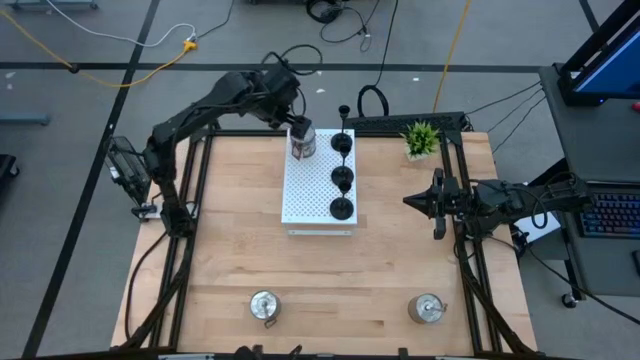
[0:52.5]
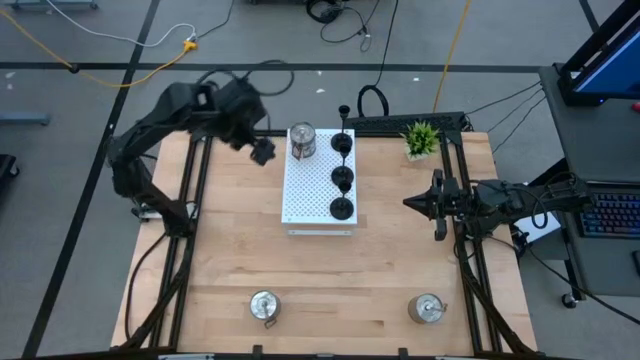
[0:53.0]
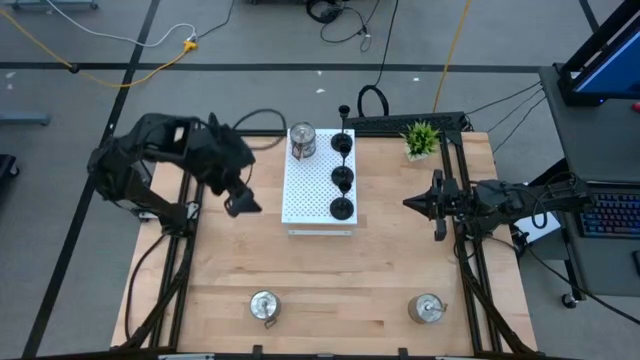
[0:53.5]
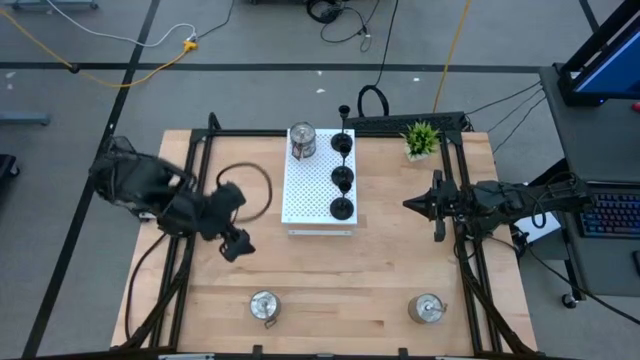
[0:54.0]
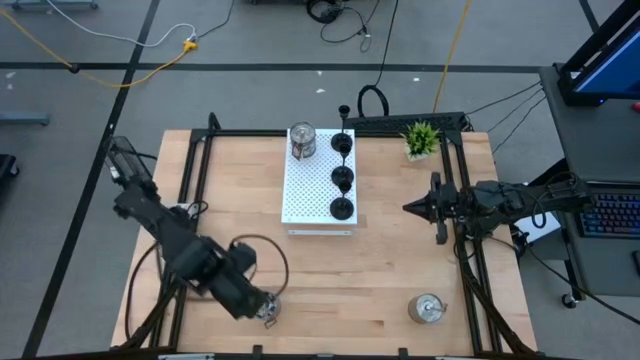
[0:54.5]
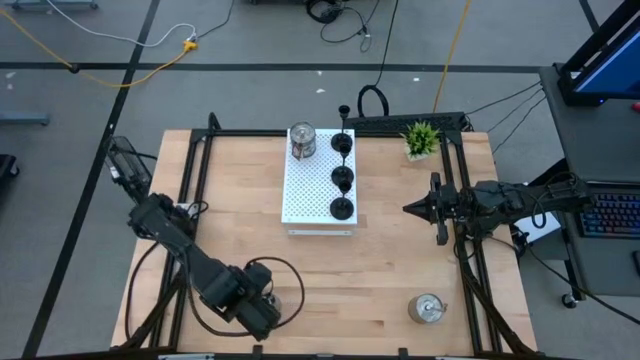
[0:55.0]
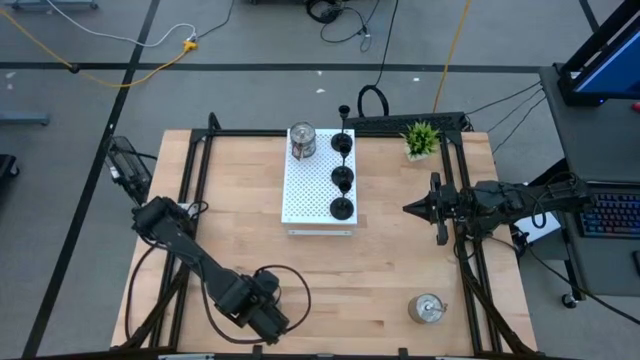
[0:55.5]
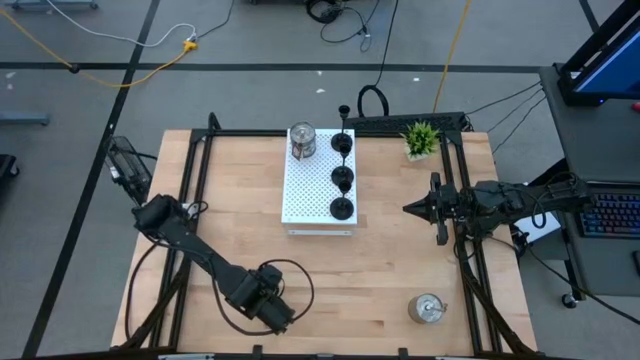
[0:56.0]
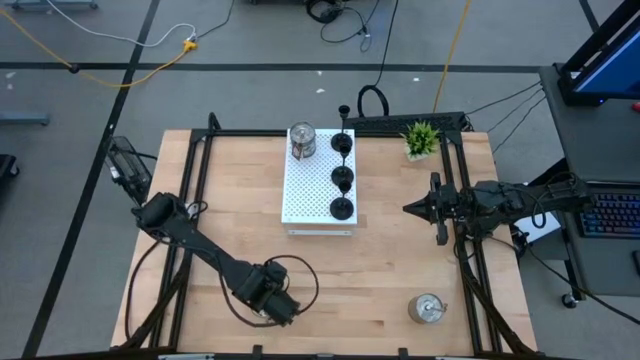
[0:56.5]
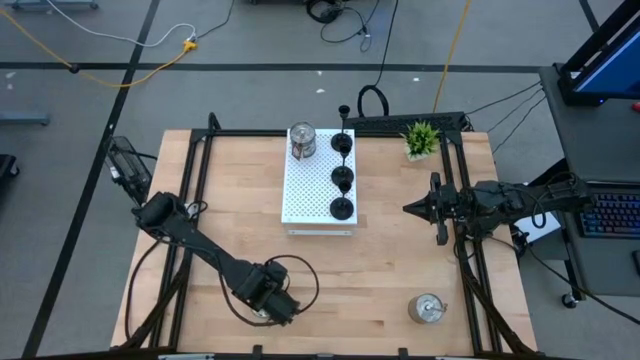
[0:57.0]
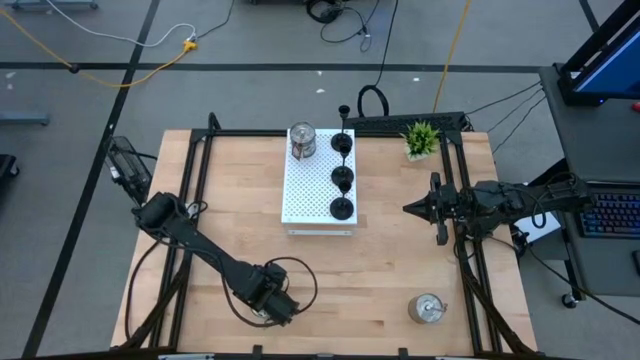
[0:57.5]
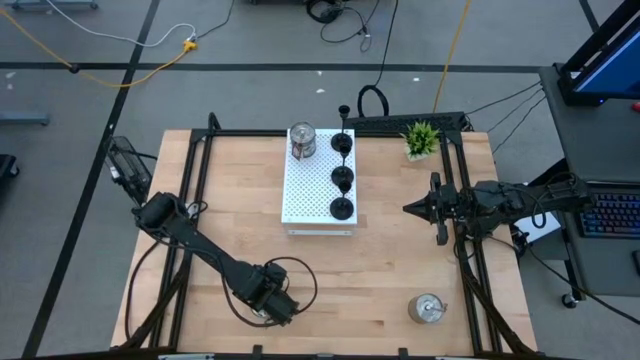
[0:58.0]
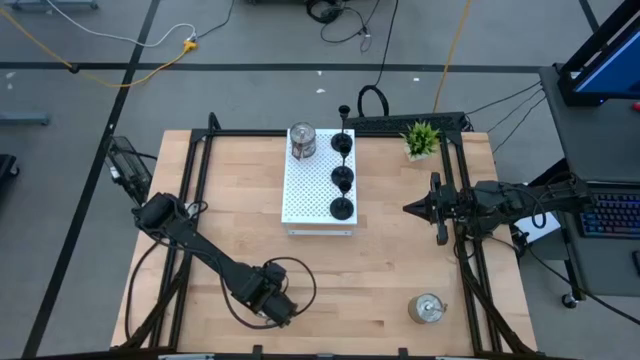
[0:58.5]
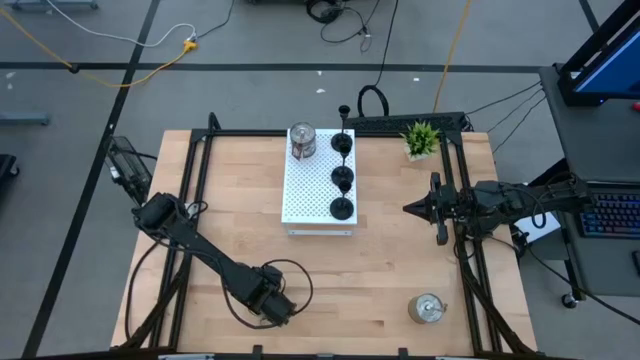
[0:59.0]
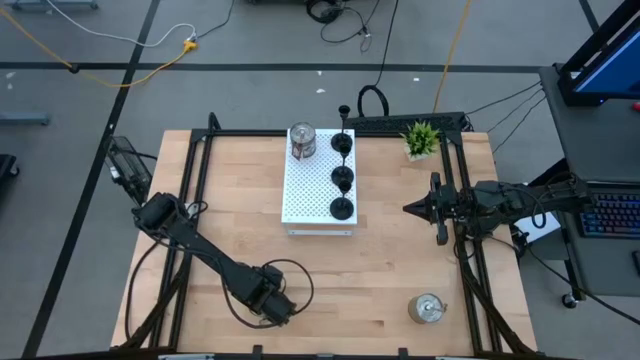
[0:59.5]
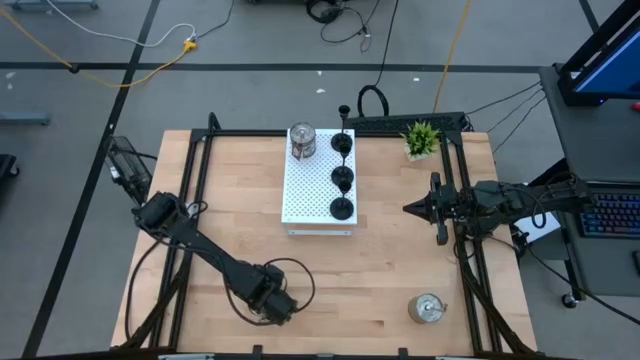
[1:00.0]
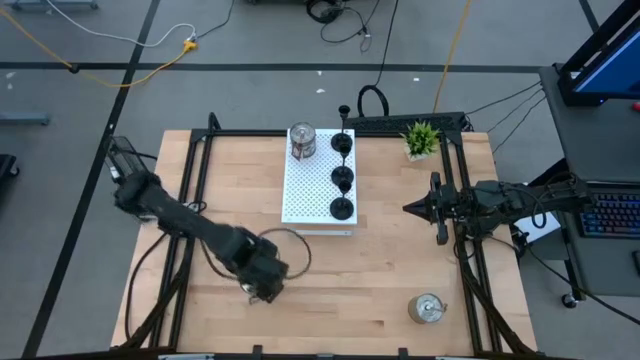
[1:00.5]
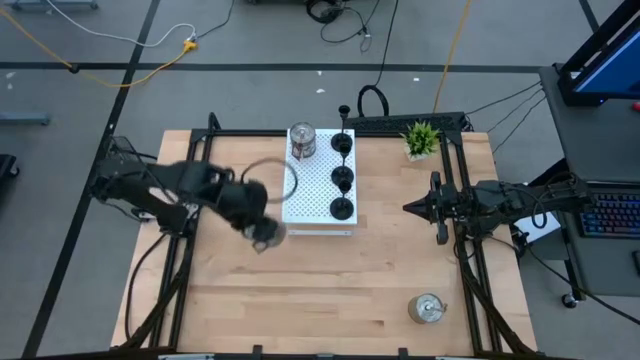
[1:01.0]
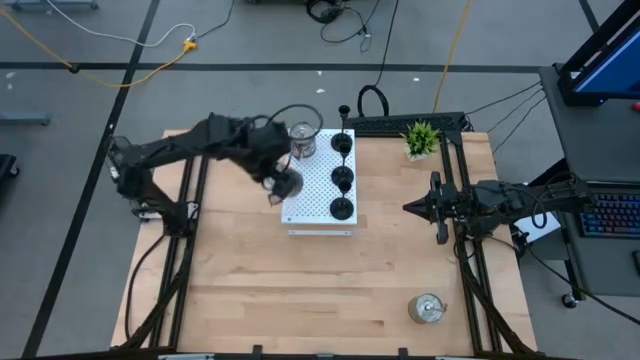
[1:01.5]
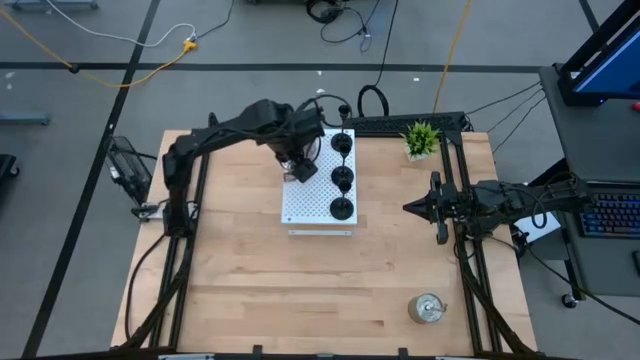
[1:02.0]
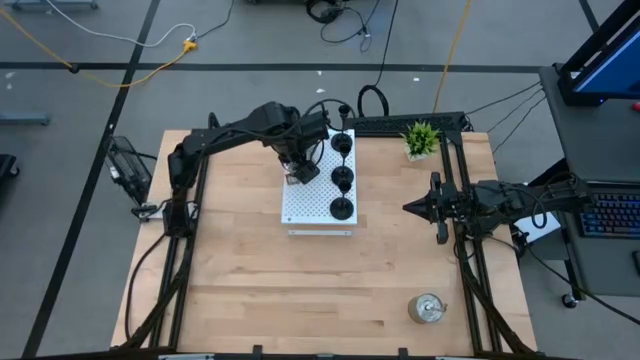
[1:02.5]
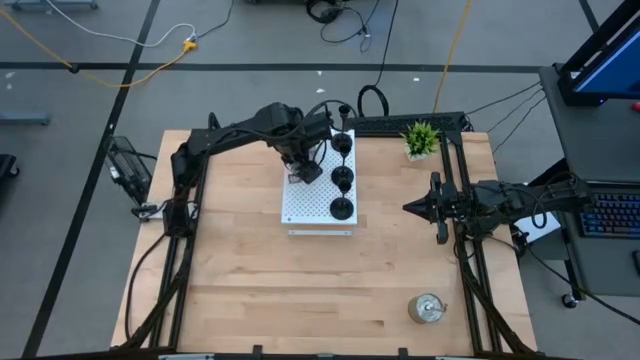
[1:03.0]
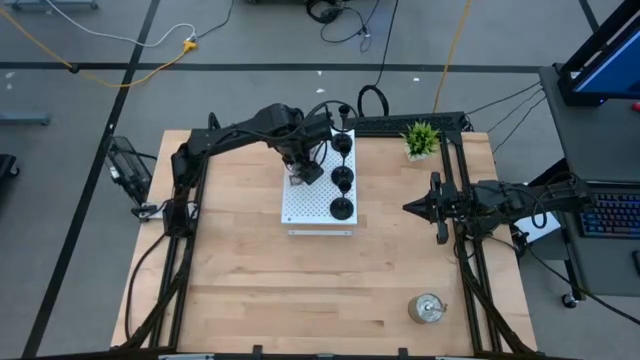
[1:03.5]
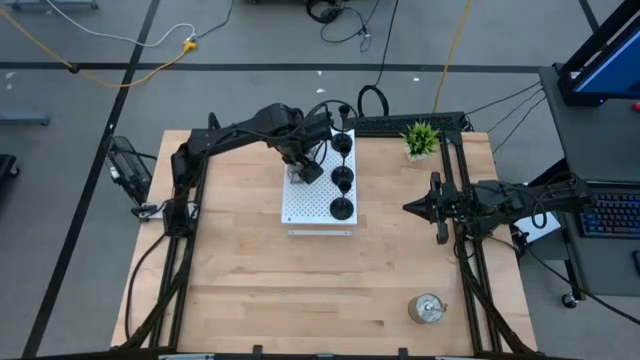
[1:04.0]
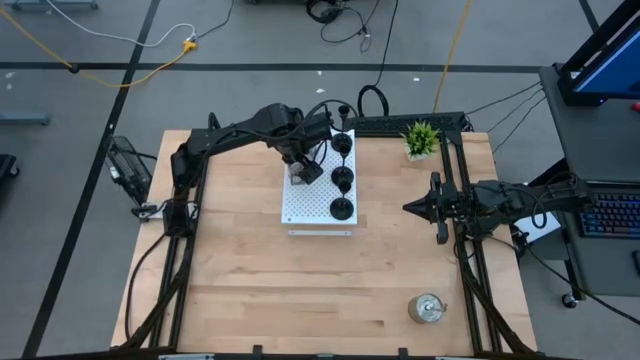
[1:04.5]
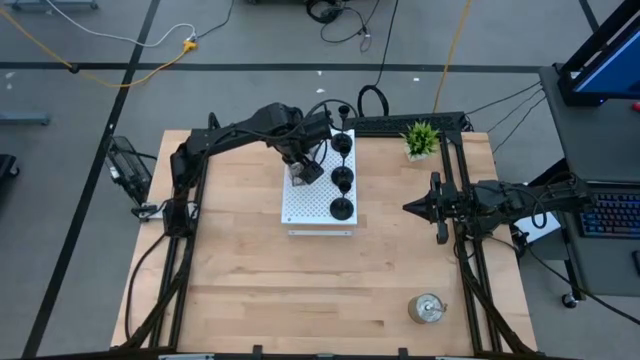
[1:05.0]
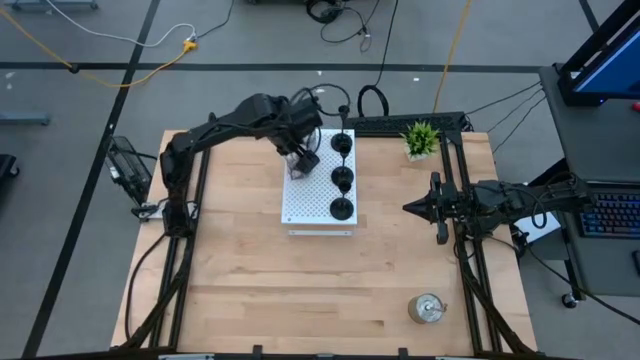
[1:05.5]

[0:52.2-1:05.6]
Task: Pick & Place candle stick holders
Put the left silver scented candle on the shelf aligned with the other silver scented candle

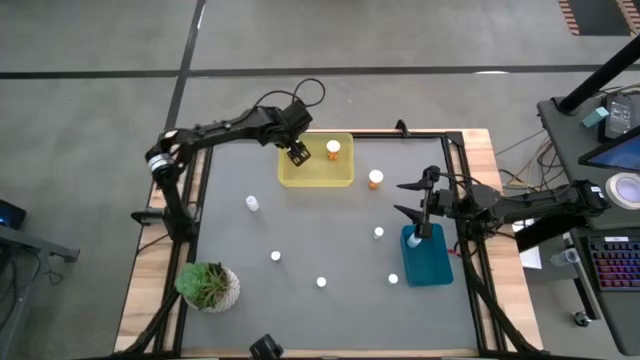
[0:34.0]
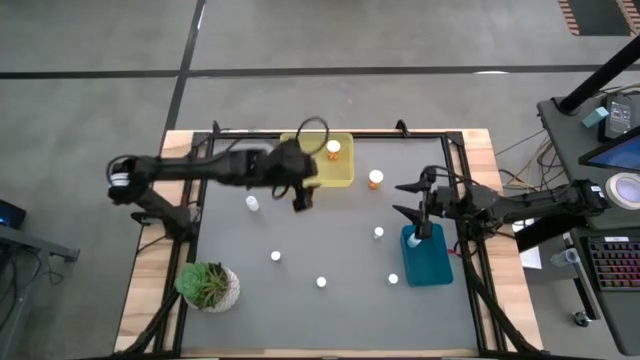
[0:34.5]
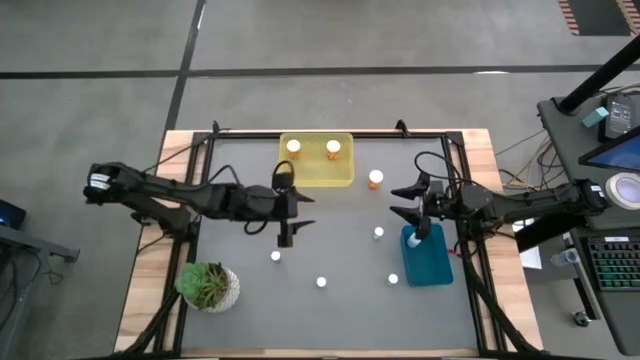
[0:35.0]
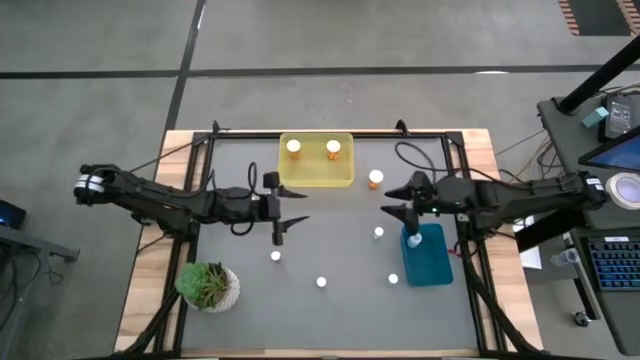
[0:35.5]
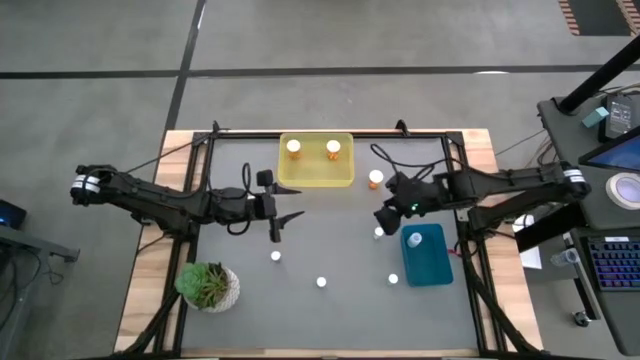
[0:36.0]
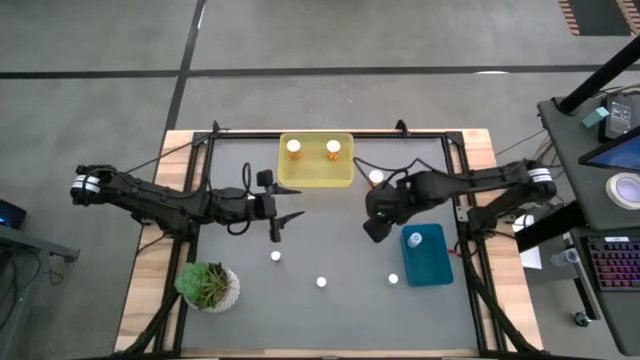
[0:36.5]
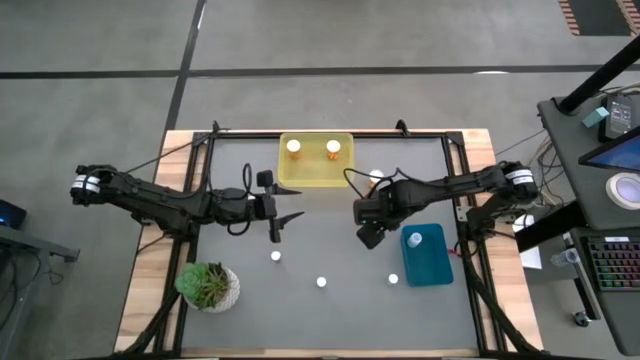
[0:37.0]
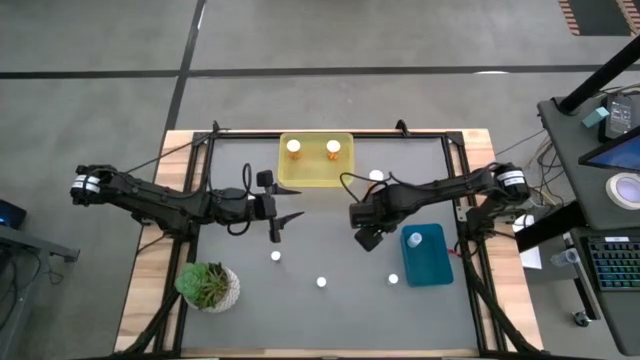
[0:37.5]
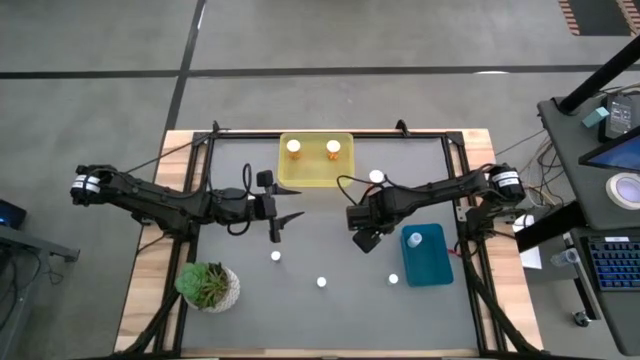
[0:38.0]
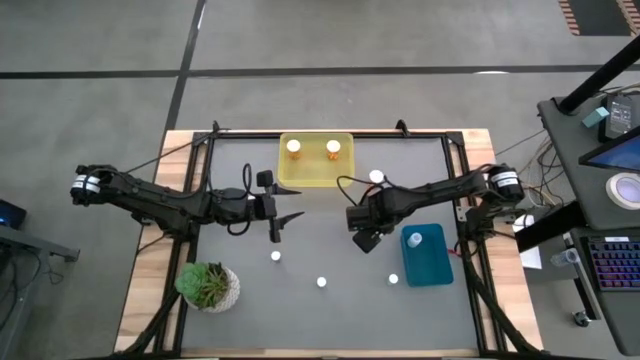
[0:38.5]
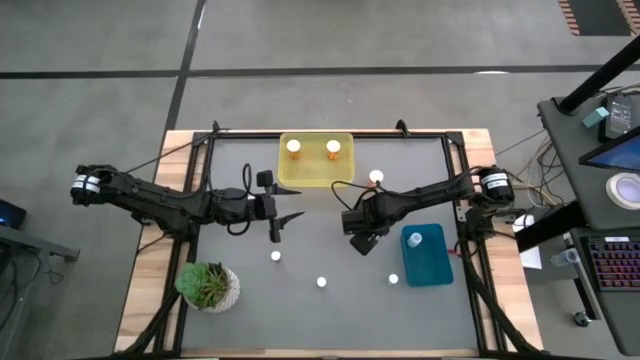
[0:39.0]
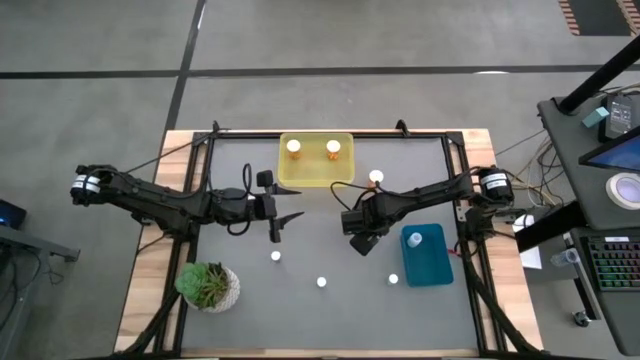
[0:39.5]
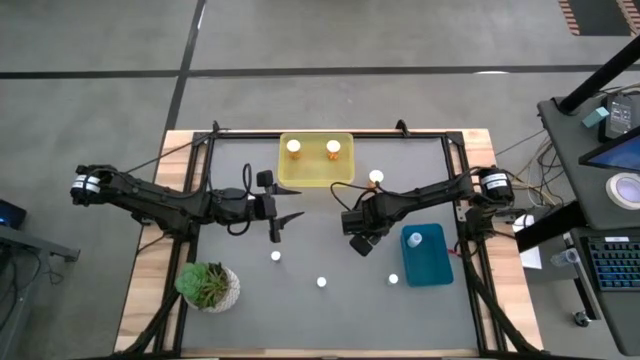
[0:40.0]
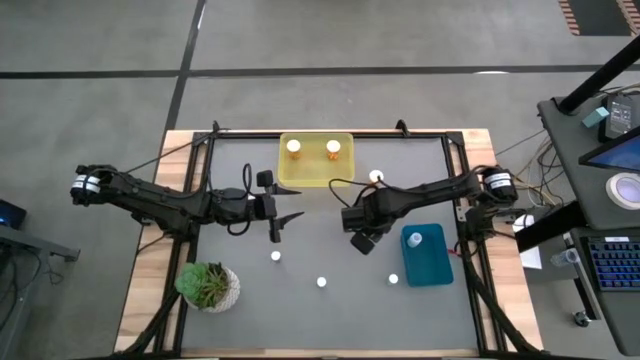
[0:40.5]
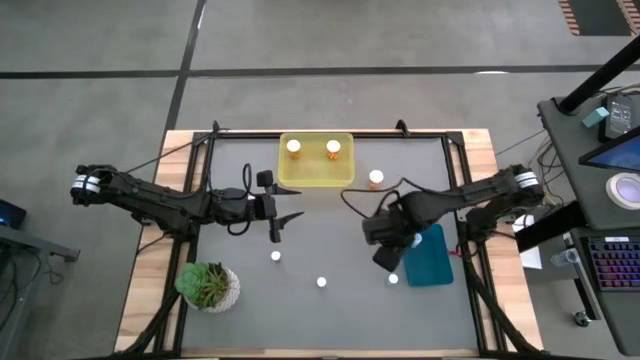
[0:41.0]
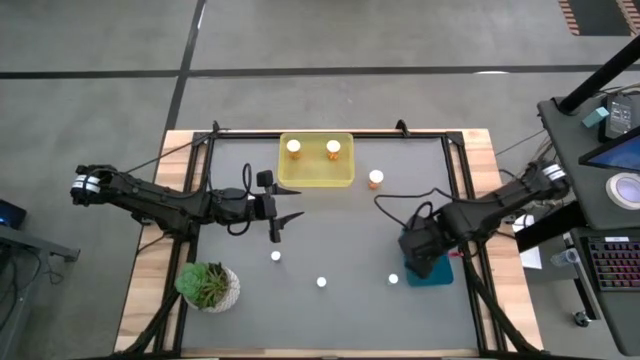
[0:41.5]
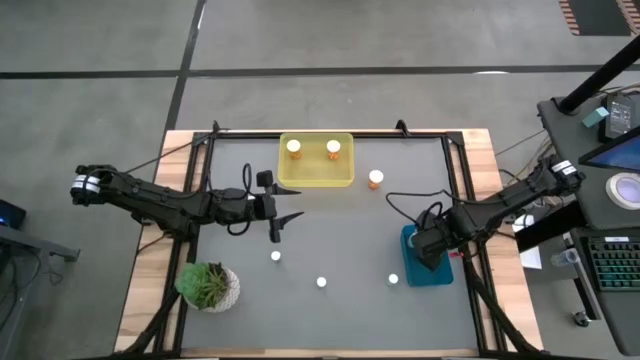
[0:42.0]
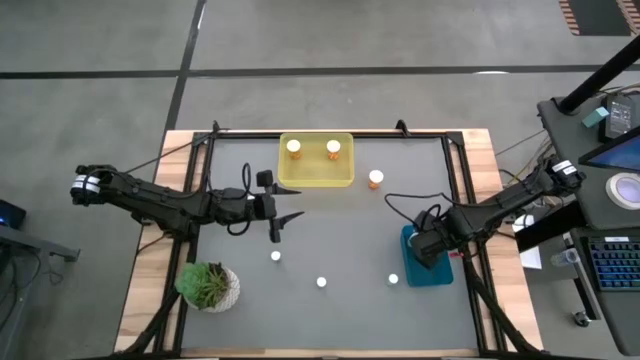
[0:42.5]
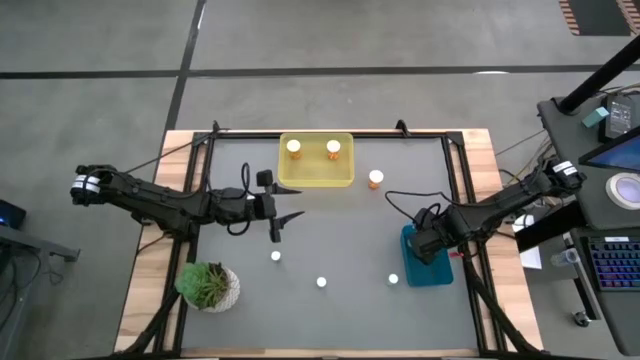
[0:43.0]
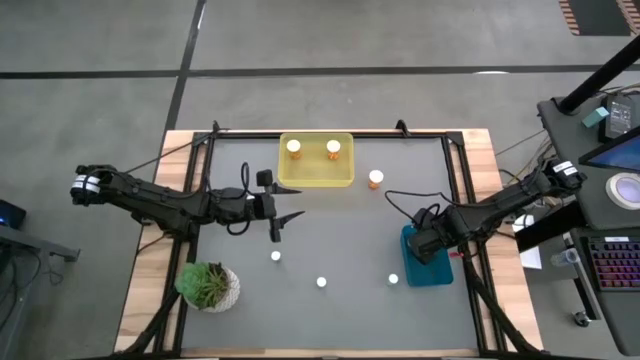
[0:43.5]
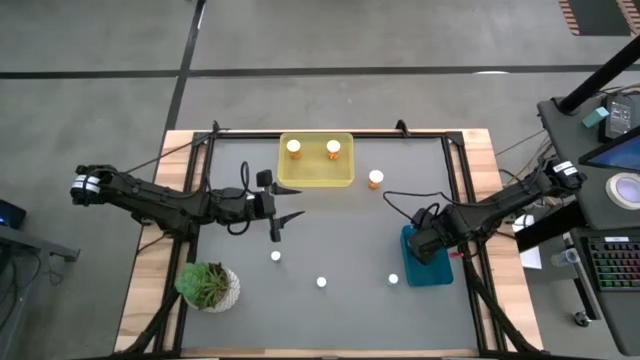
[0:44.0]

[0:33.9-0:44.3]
Task: Pick and place medicine bottles into bin by pill shape (circle, oval)
Put the blue pill bottle into the blue bin
